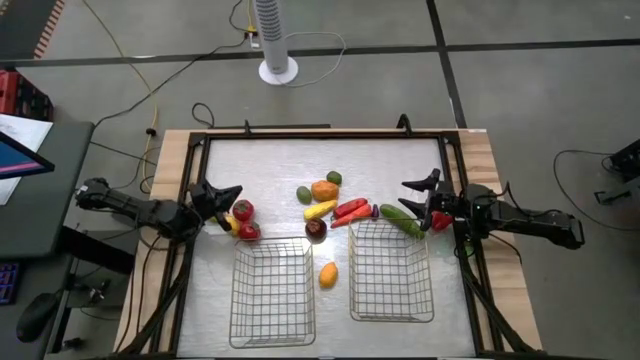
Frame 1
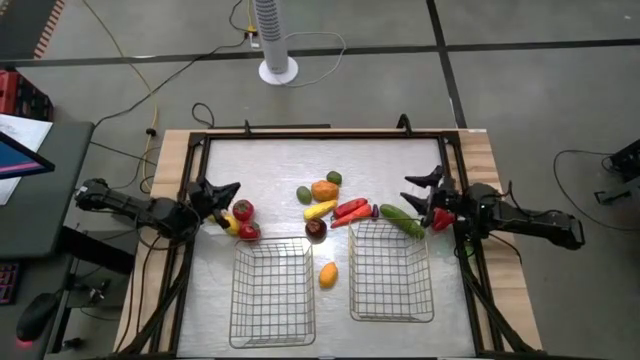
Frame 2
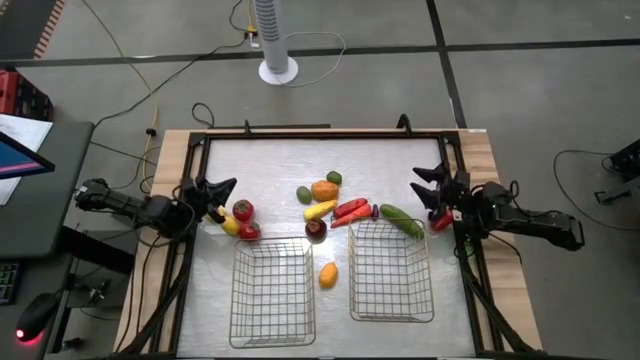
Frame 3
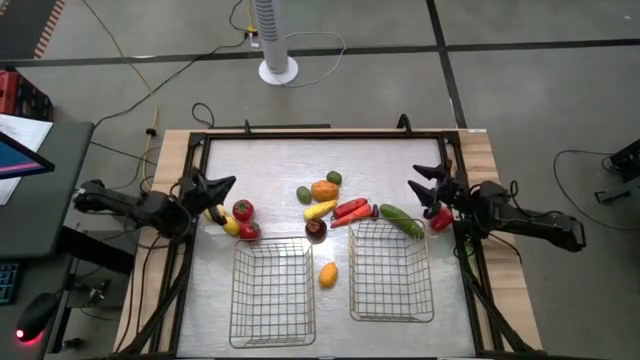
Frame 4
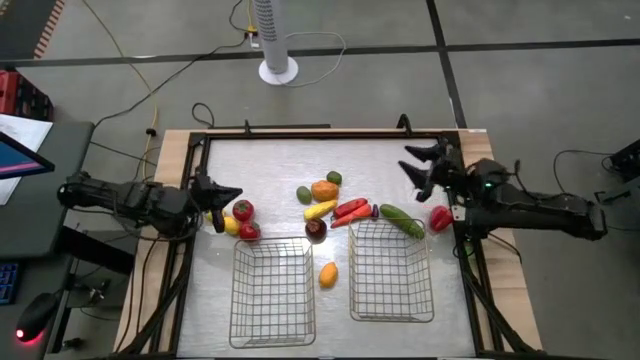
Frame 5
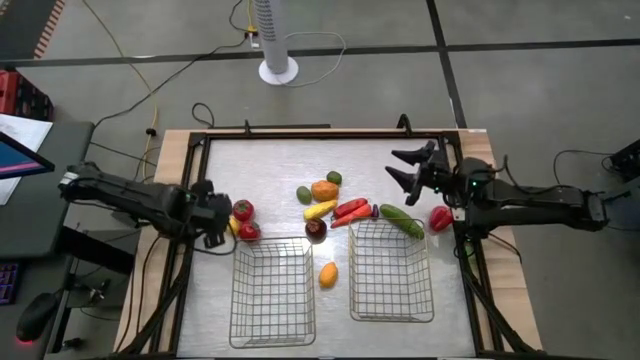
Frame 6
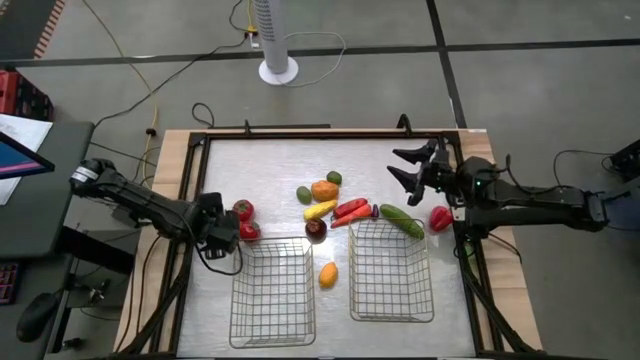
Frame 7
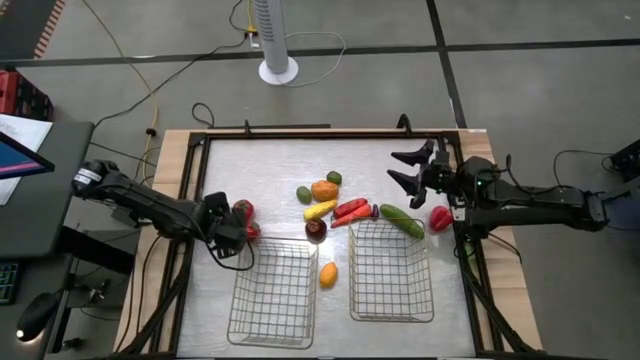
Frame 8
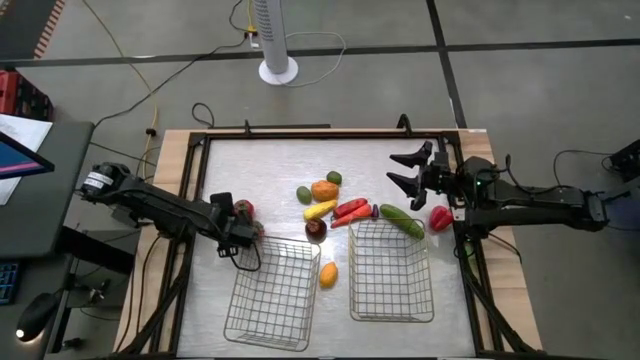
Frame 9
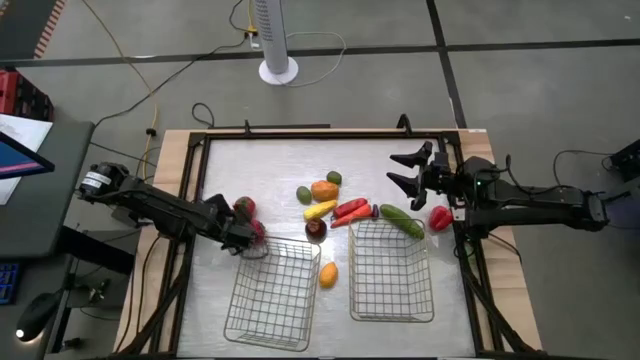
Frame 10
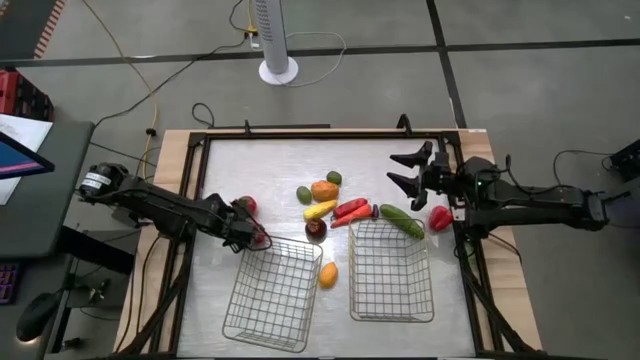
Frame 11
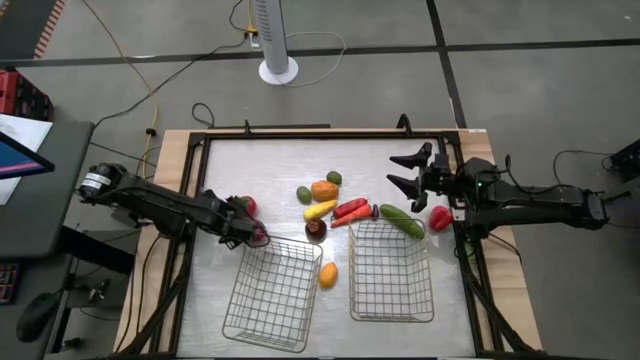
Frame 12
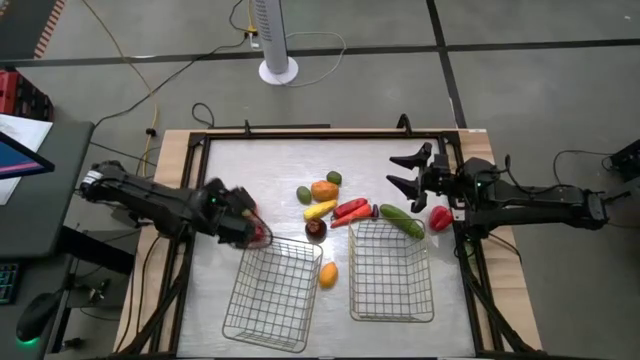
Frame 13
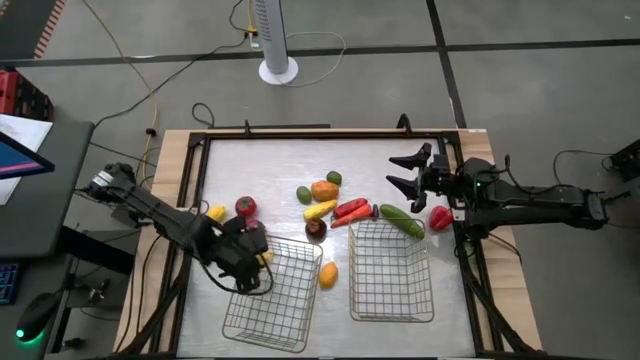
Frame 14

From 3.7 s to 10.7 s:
Task: Sort produce into baskets
Put the right yellow lemon into the left wire basket

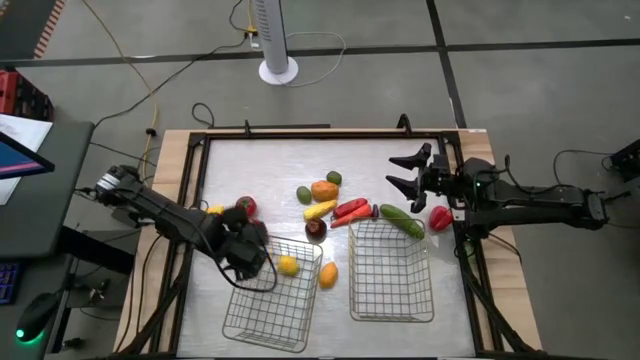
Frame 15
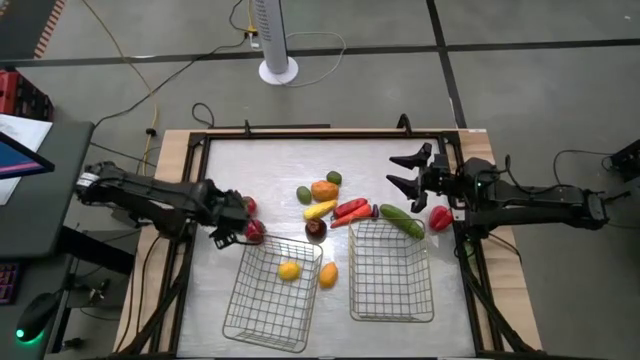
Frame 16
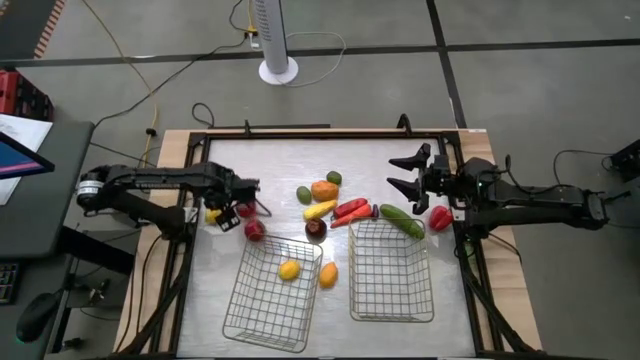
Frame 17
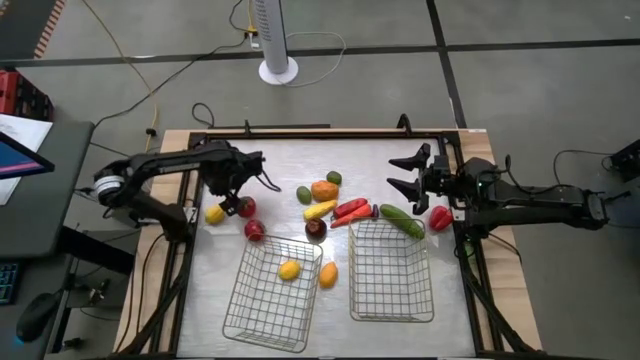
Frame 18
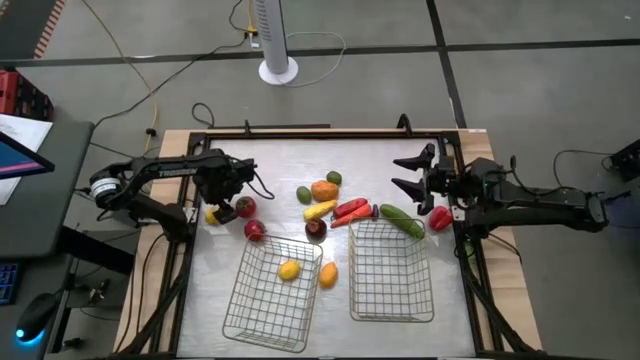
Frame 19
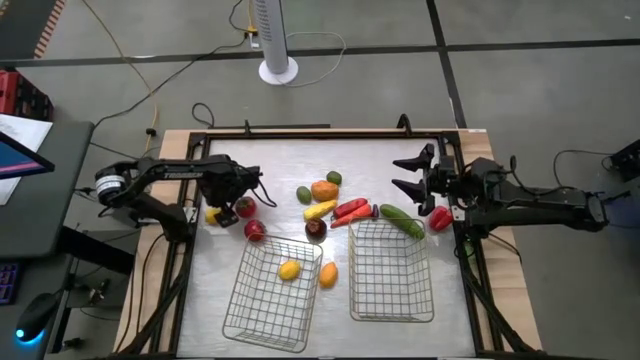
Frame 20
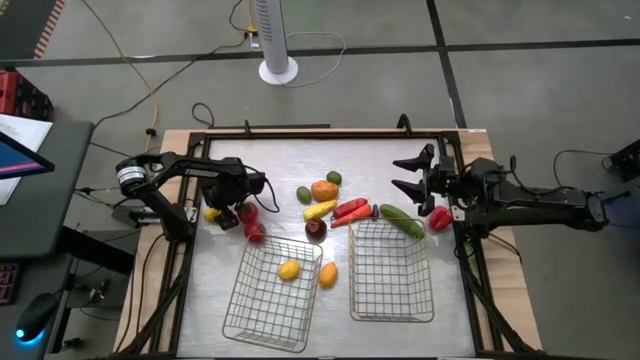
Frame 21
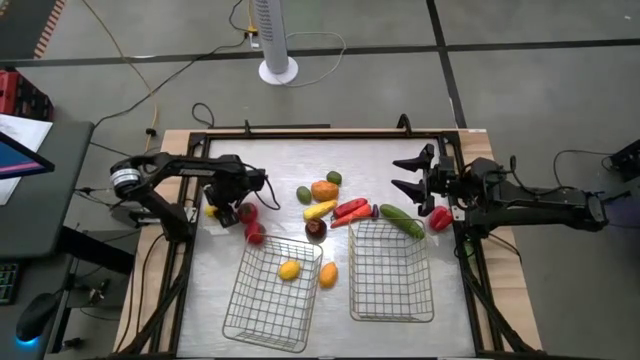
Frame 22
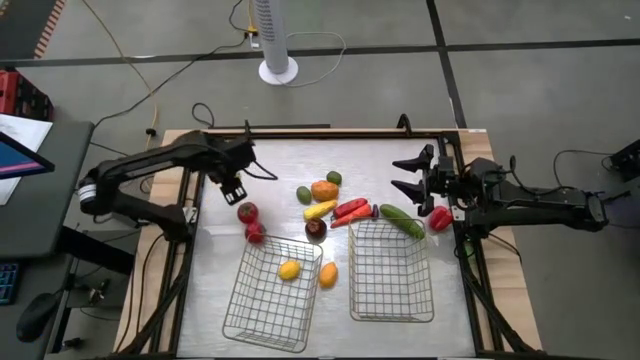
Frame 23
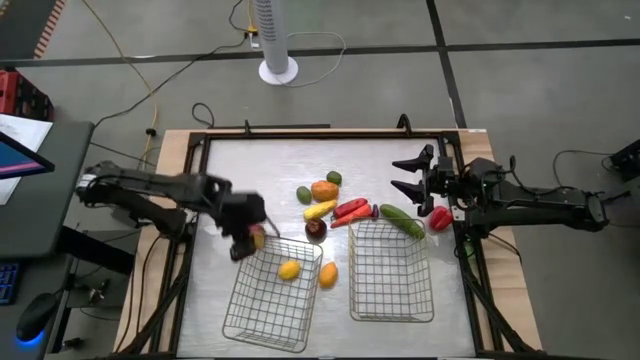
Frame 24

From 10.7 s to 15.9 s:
Put the top yellow lemon into the left wire basket

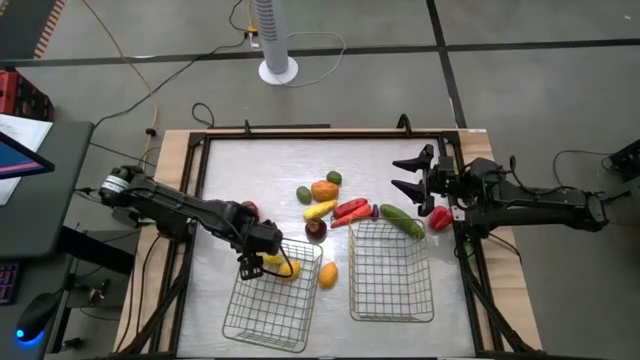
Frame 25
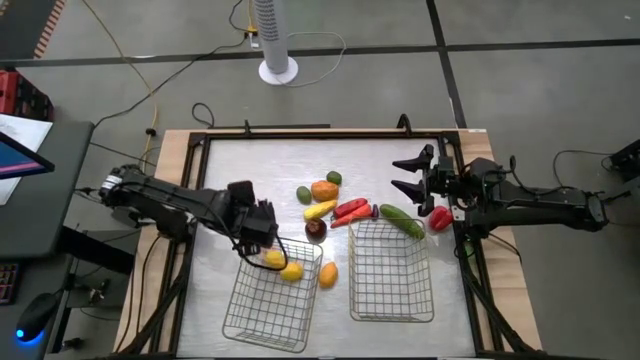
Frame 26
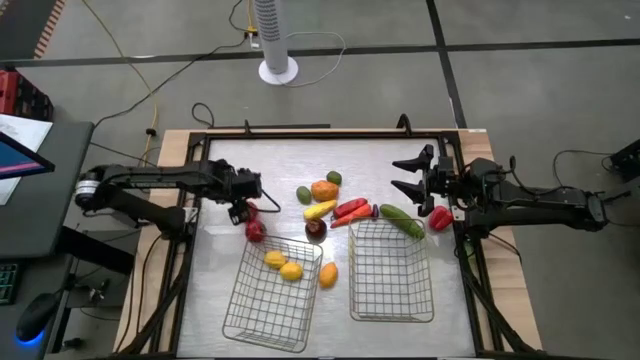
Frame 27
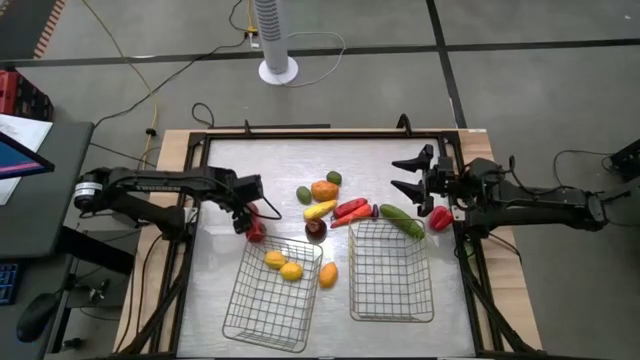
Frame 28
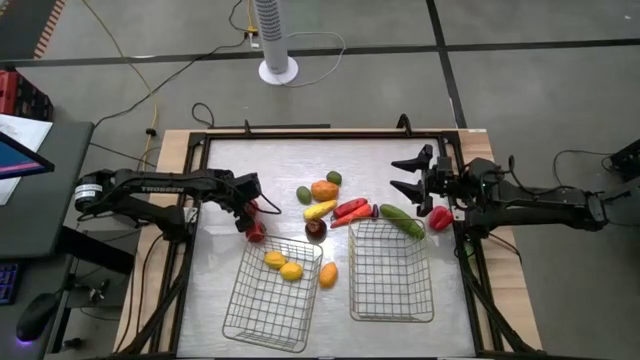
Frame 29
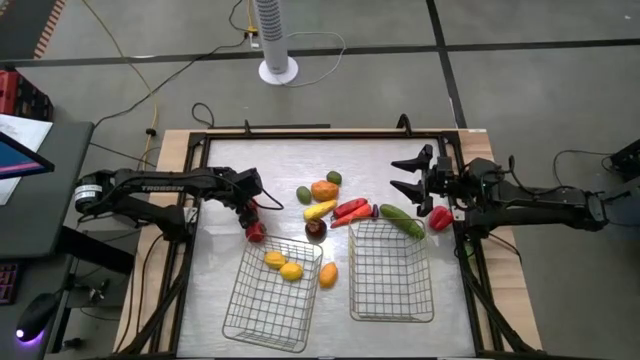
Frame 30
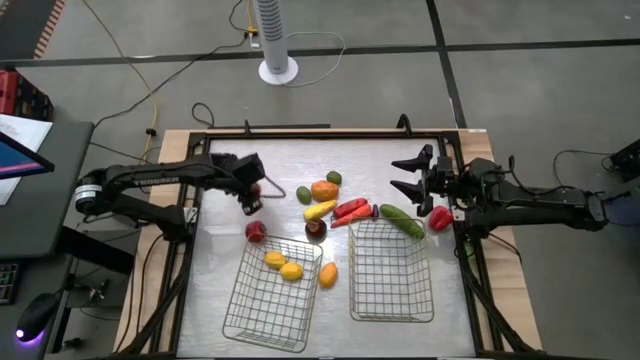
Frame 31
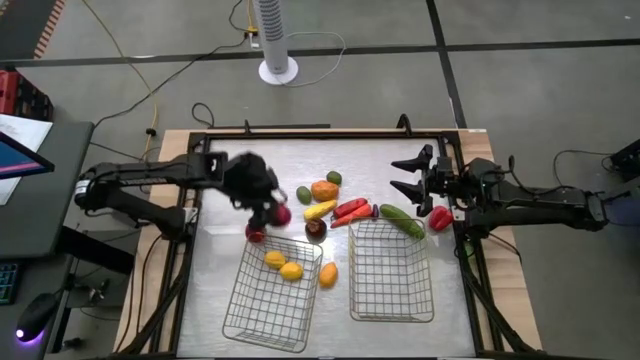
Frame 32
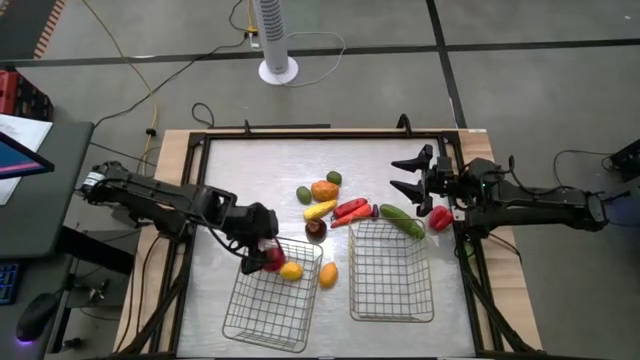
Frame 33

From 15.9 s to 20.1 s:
Put the top red tomato into the left wire basket

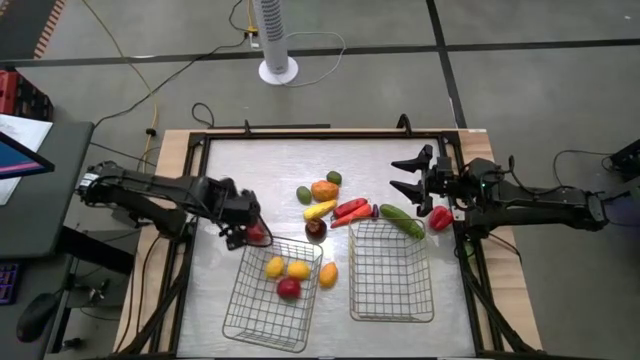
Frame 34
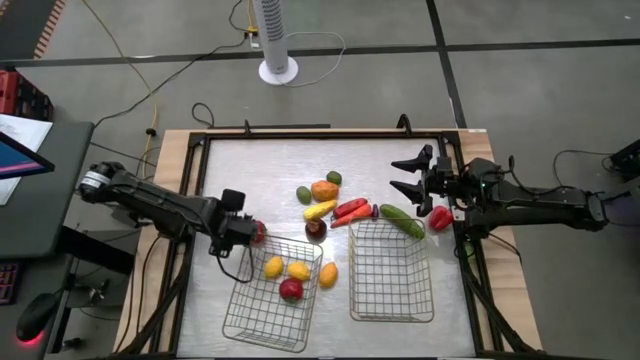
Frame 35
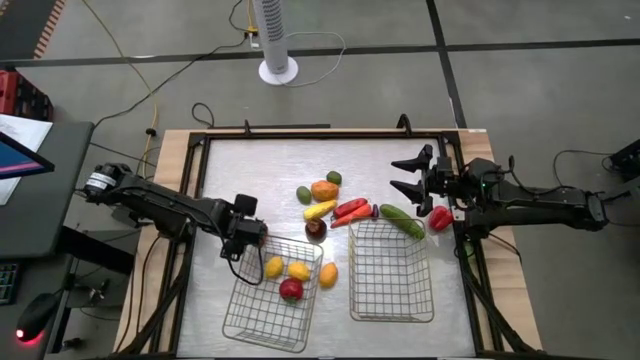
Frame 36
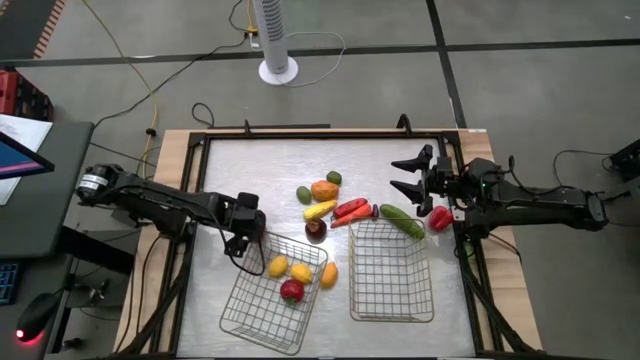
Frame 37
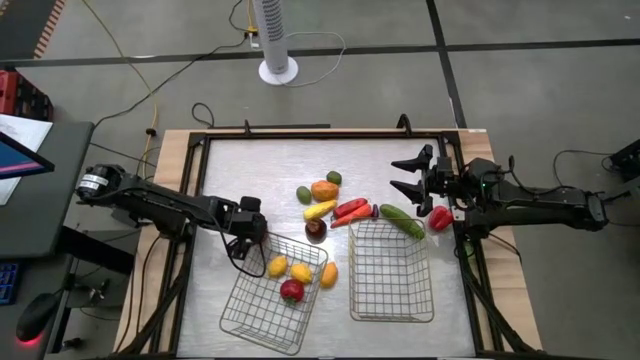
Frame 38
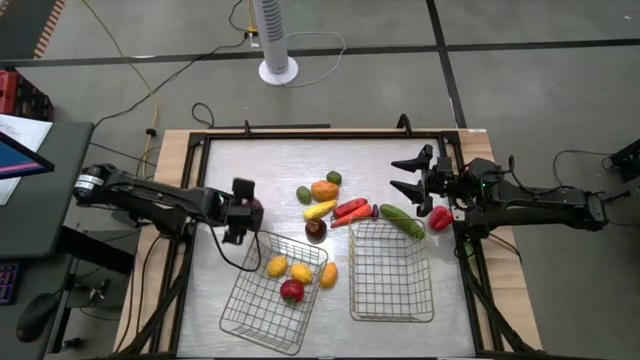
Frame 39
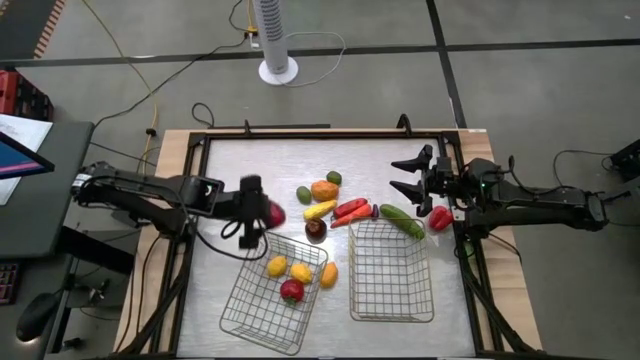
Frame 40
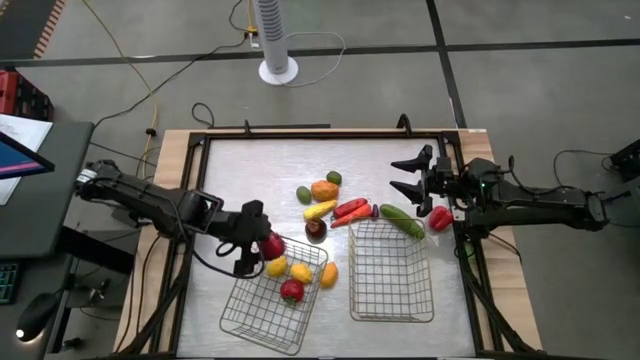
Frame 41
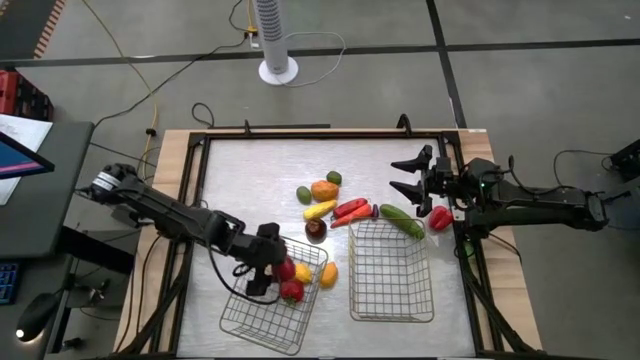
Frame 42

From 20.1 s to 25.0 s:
Put the red tomato into the left wire basket
